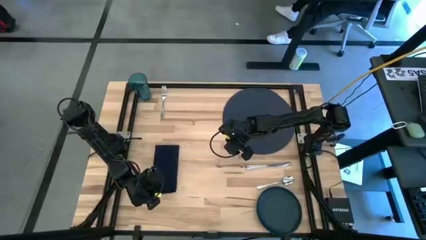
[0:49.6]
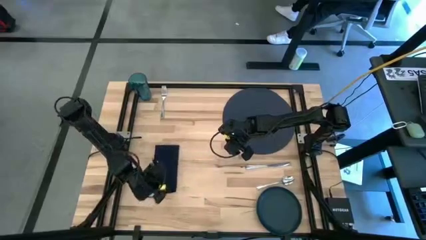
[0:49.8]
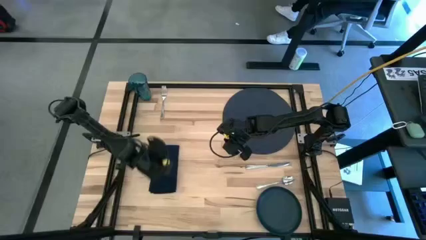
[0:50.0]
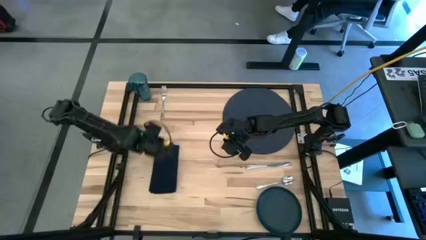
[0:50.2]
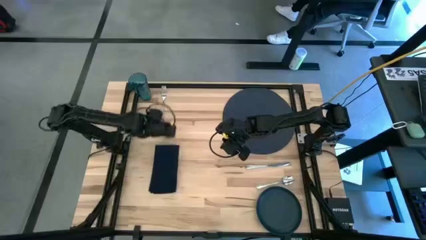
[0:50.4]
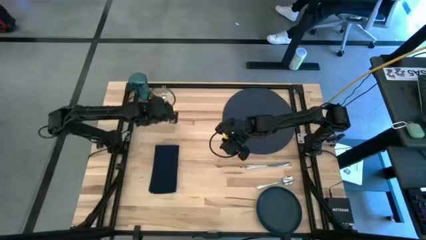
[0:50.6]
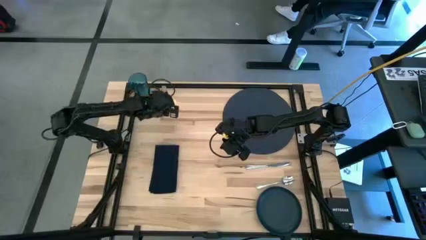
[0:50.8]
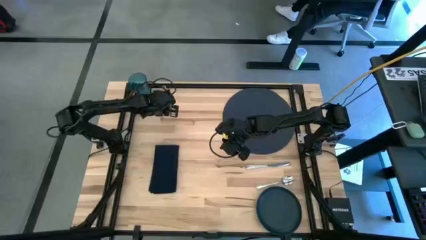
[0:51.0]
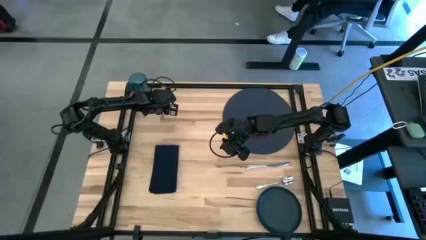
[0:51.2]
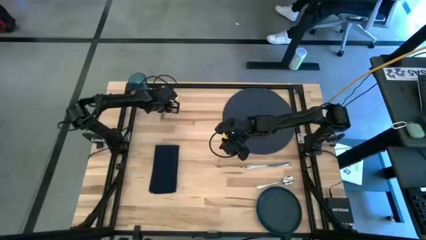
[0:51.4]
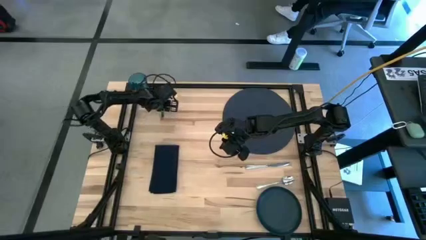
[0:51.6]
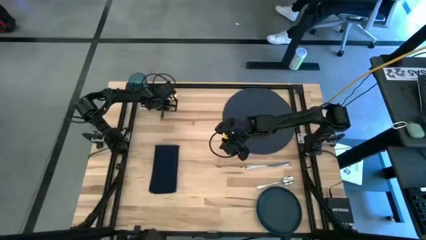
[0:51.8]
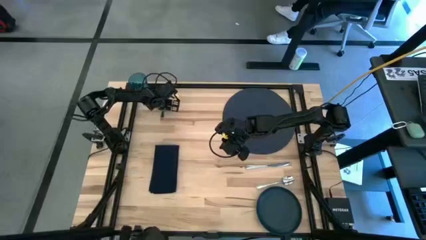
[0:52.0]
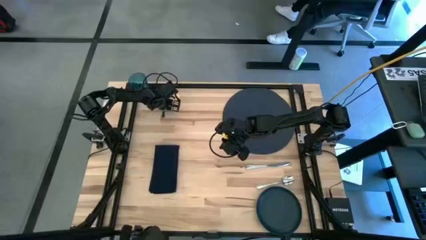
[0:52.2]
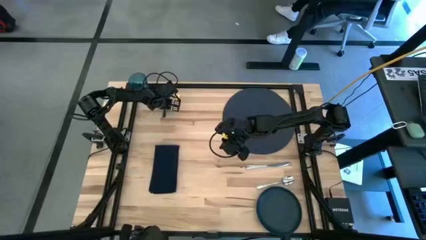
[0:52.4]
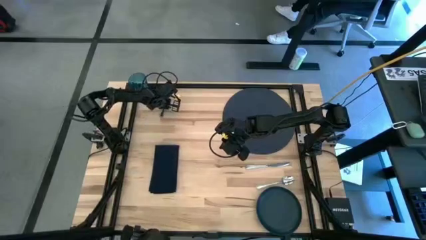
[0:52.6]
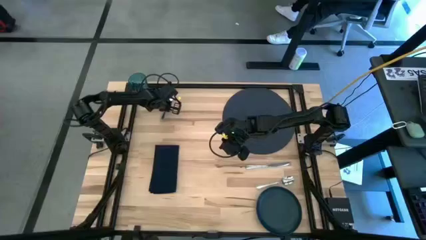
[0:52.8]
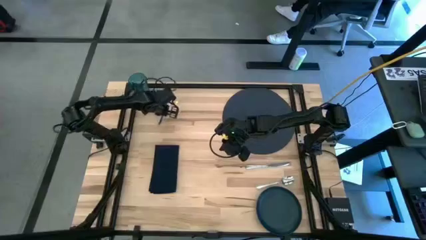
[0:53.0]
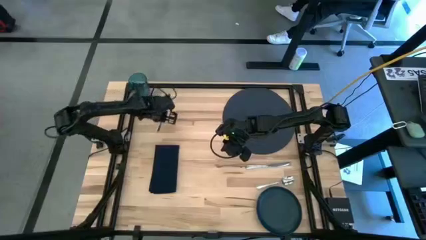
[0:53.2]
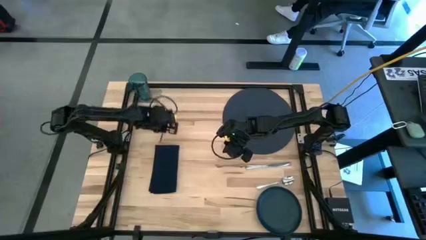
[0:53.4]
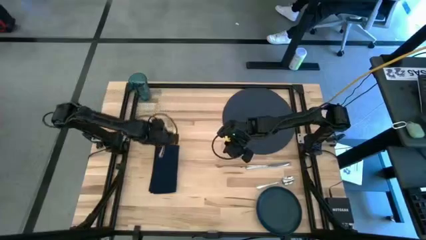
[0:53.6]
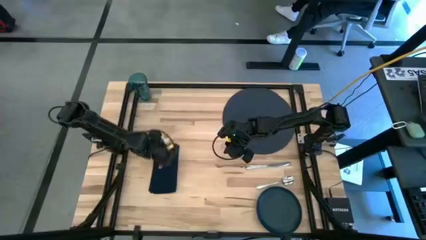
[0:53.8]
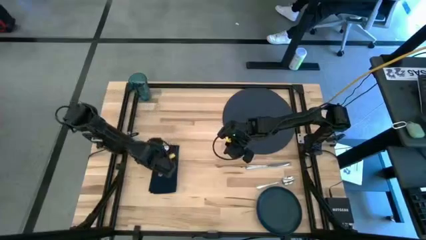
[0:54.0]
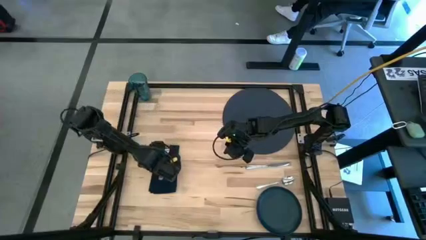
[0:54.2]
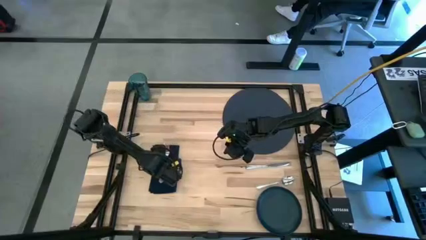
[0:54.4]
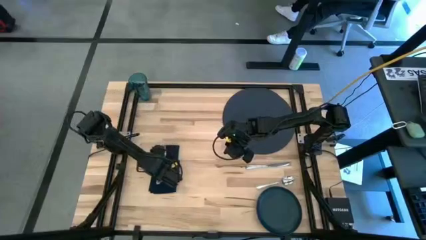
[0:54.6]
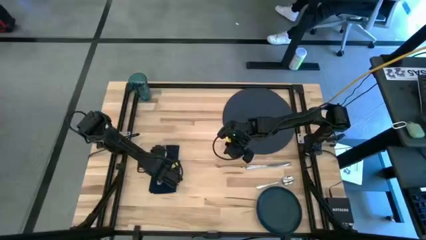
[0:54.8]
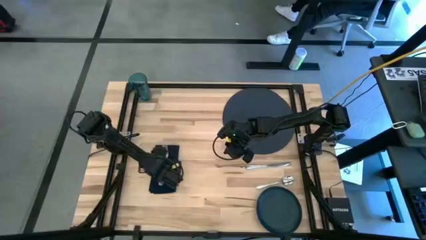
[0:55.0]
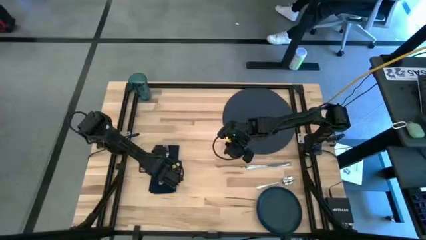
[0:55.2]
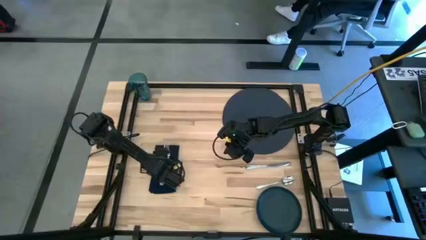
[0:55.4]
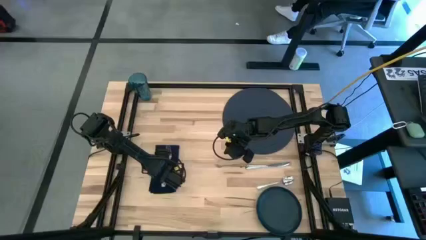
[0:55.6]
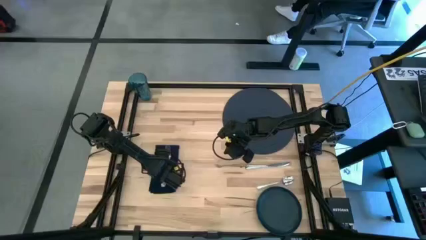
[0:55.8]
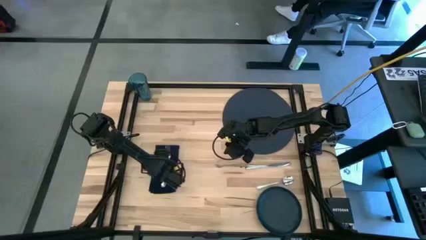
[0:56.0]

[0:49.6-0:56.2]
Task: Set table place
Put the silver fork on top of the black table napkin

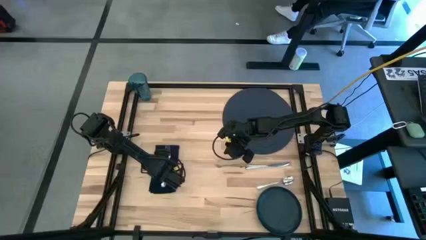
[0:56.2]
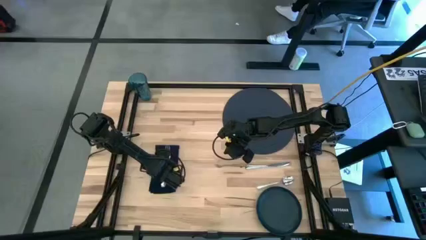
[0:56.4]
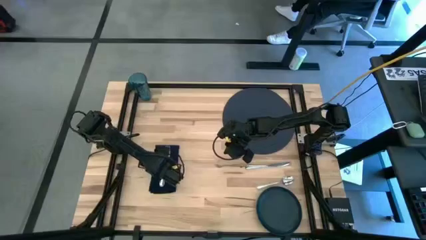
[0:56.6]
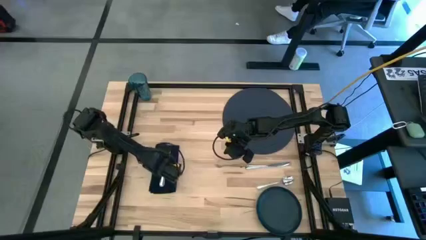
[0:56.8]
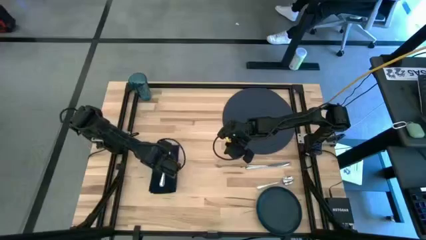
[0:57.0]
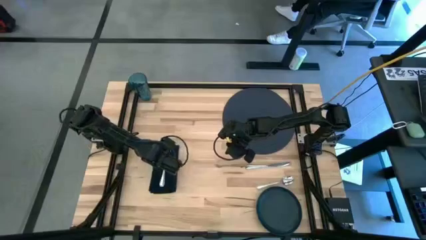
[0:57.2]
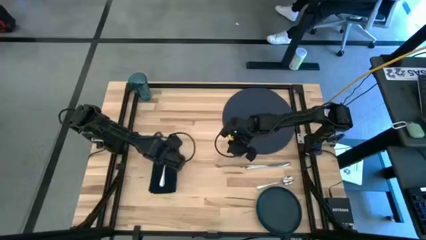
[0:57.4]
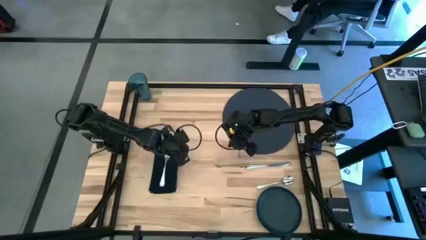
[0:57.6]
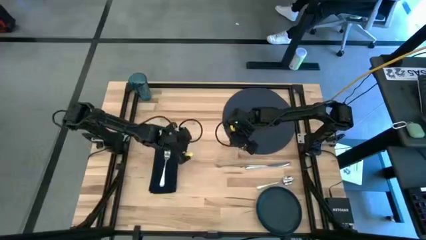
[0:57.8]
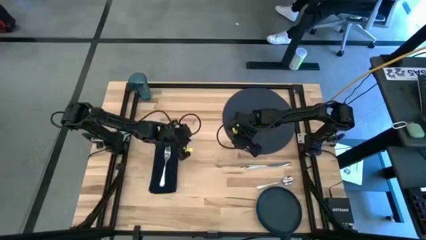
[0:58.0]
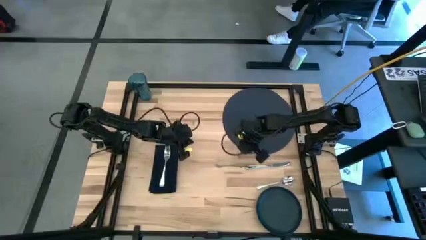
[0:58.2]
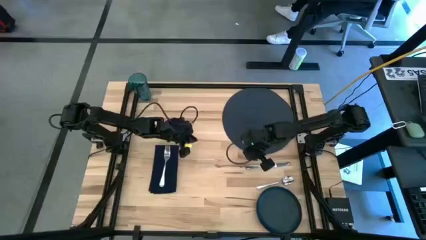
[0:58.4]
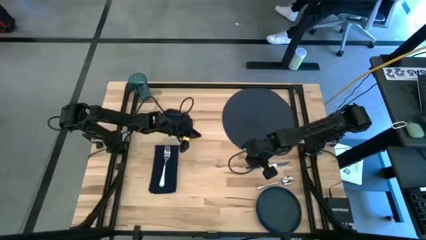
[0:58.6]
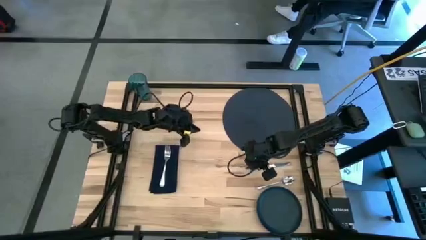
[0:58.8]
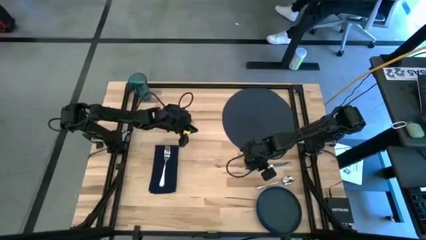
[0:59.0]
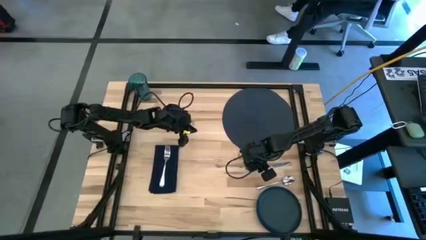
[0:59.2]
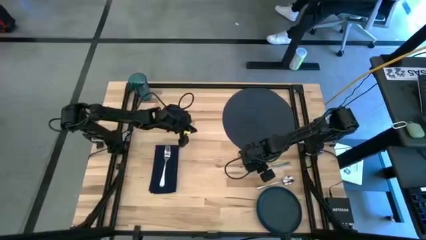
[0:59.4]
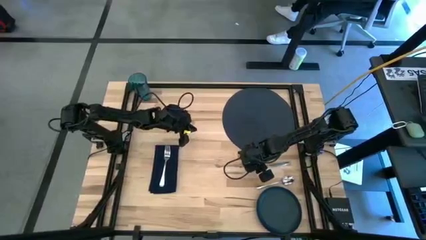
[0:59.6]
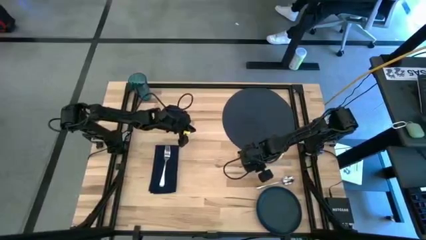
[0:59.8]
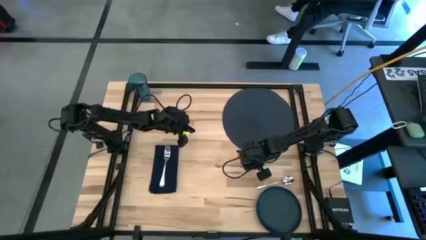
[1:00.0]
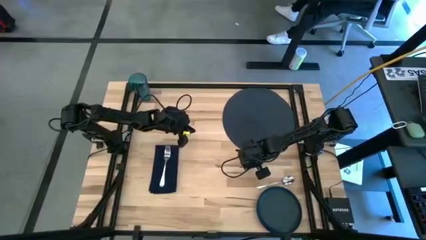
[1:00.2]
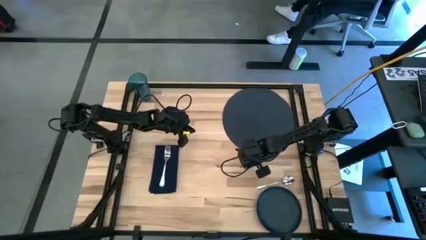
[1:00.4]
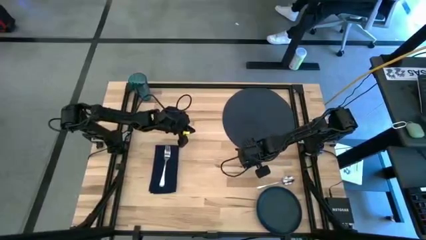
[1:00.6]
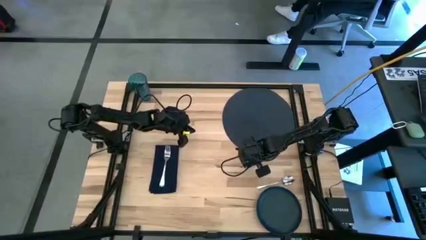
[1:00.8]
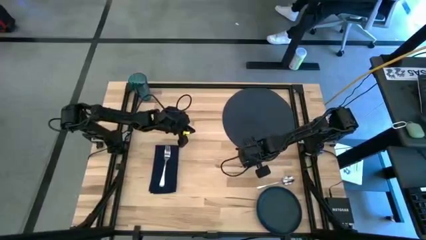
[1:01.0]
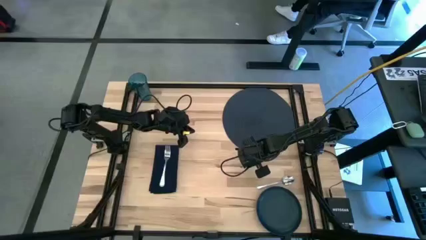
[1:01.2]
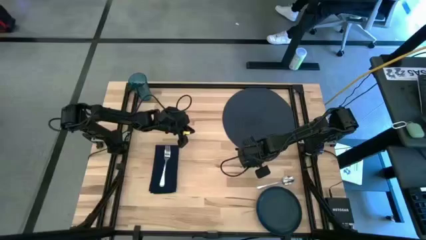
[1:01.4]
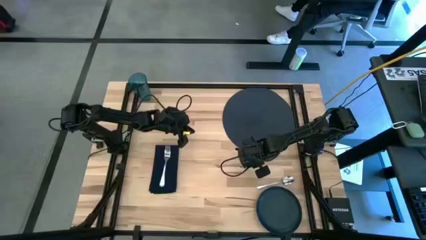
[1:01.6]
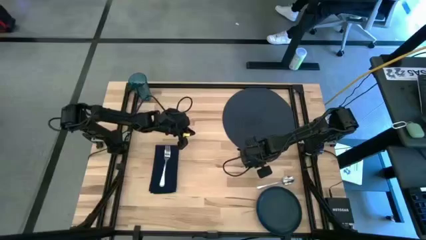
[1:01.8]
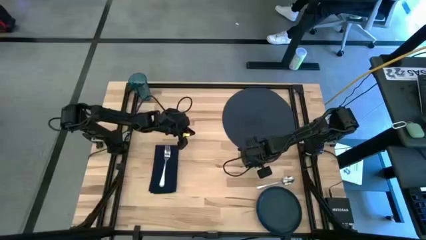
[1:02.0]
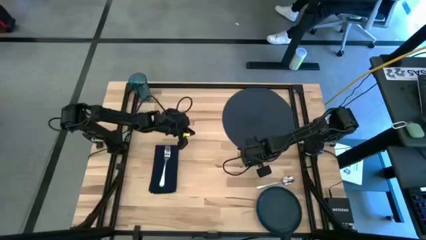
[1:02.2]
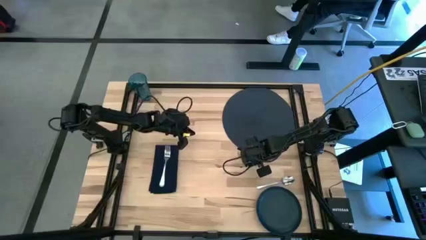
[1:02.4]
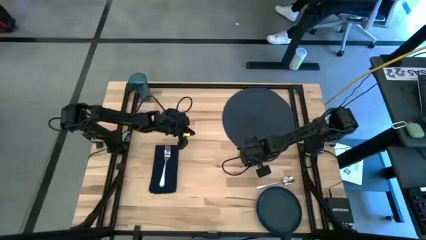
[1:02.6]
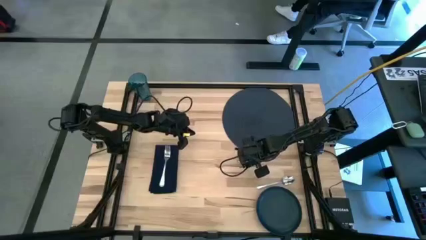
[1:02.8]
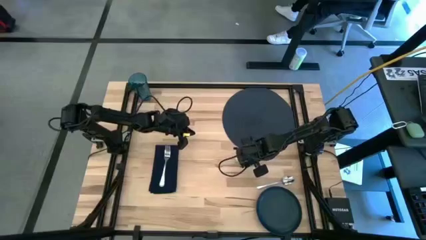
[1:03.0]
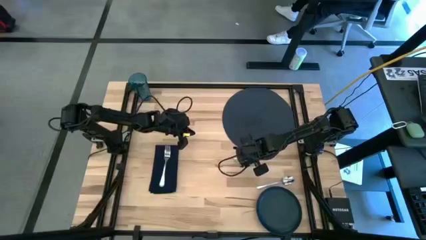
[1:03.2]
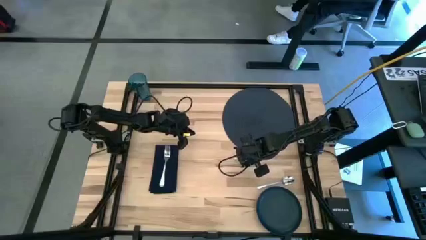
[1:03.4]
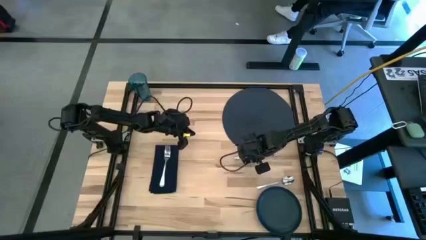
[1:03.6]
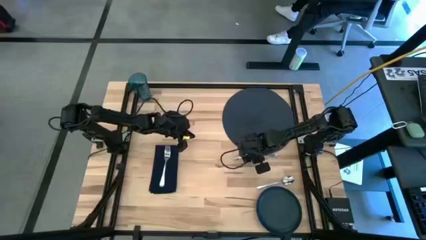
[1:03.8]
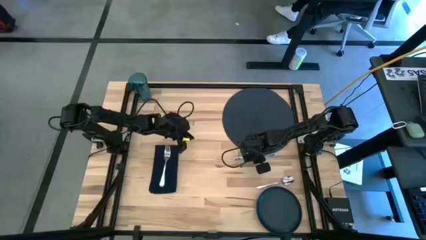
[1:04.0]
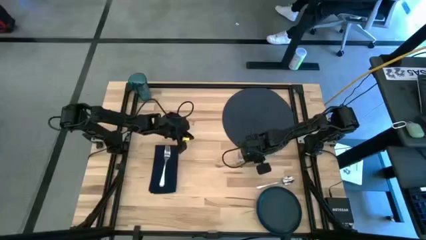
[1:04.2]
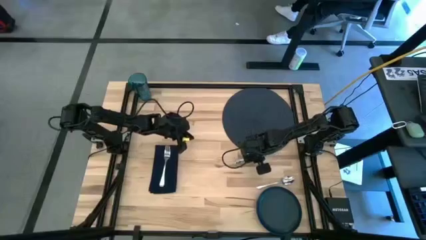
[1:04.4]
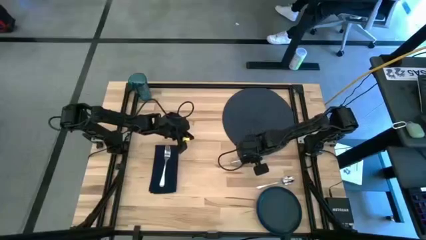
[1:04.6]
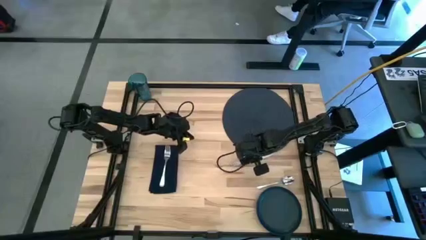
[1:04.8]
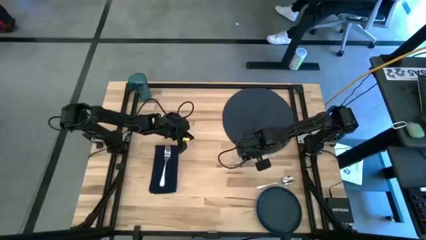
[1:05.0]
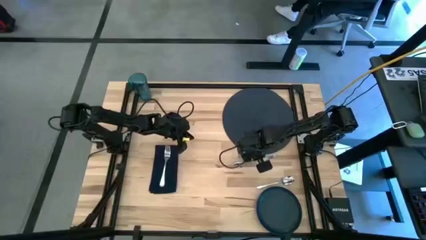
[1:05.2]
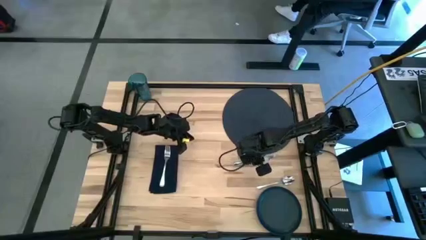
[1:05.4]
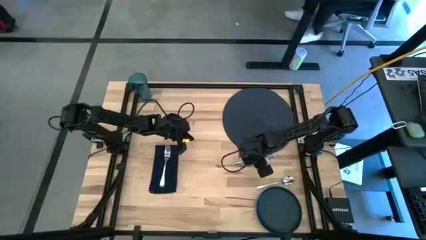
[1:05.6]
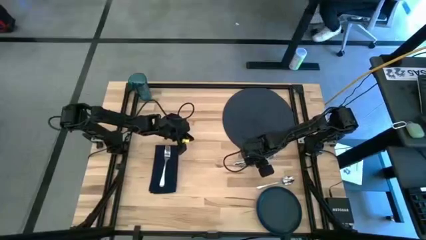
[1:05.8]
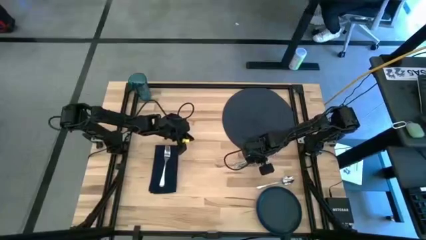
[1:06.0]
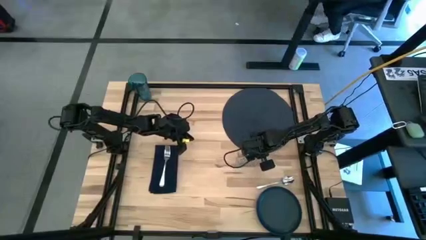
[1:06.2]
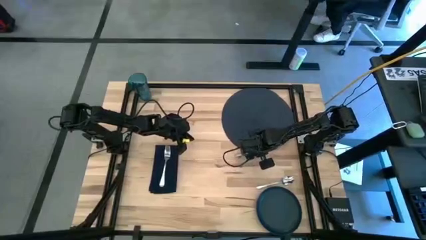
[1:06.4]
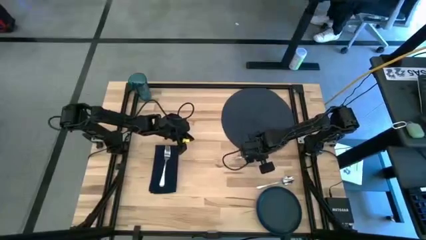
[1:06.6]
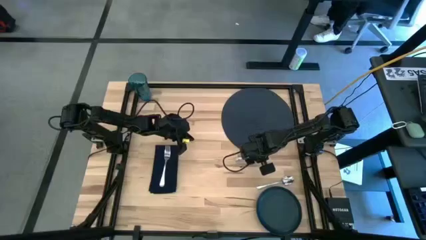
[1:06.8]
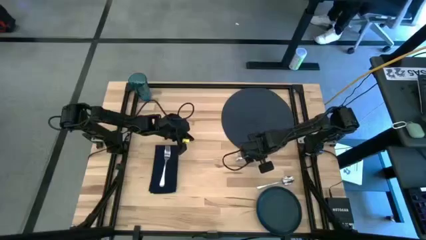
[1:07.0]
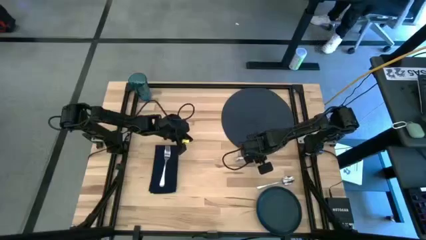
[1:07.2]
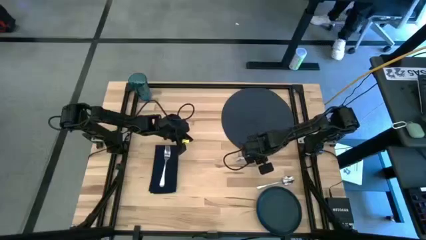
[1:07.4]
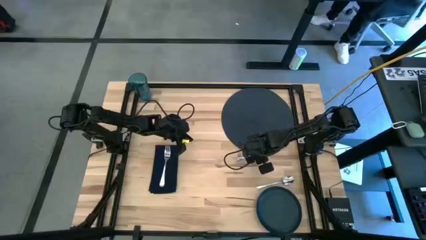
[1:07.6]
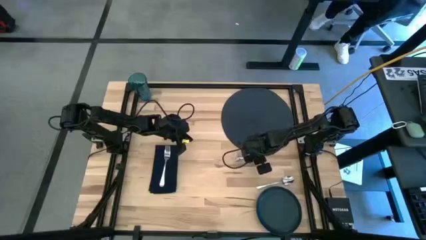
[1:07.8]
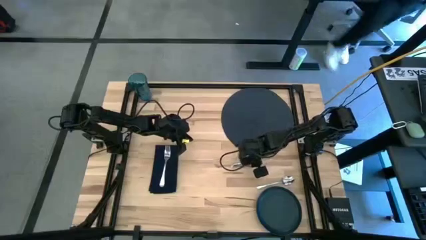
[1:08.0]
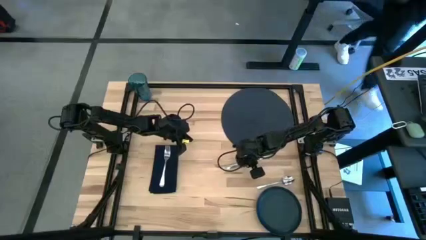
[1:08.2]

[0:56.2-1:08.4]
Put the silver table knife on the black tablemat
